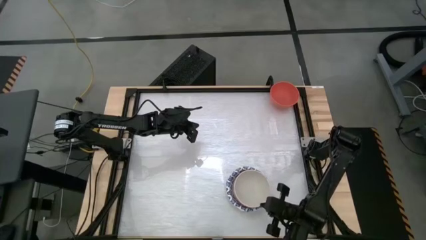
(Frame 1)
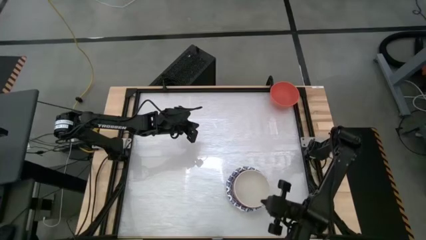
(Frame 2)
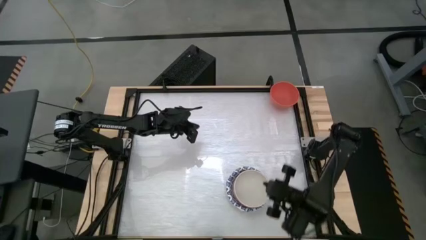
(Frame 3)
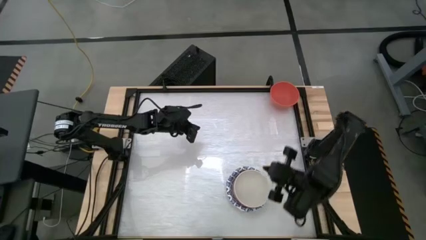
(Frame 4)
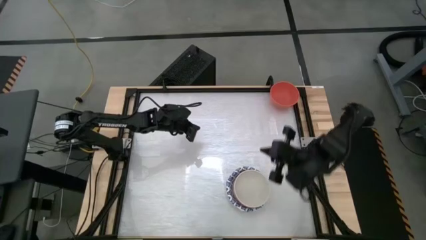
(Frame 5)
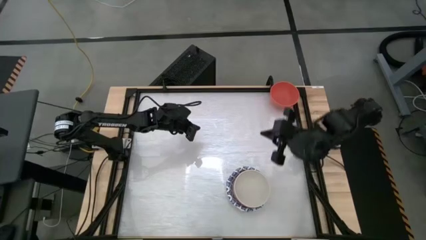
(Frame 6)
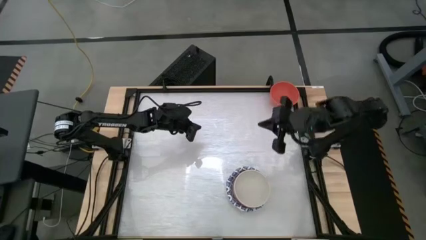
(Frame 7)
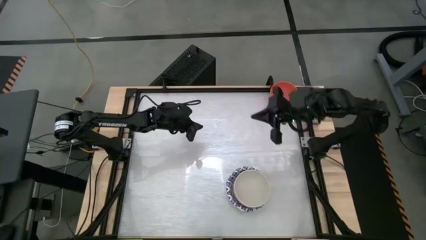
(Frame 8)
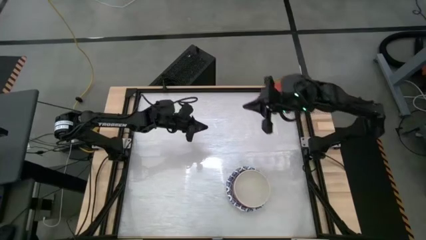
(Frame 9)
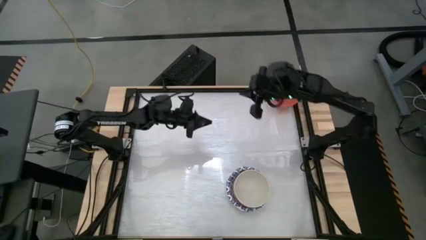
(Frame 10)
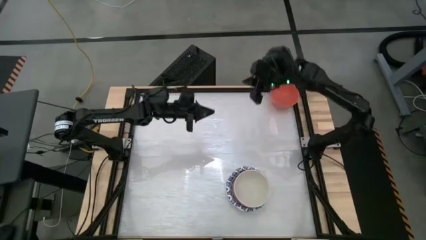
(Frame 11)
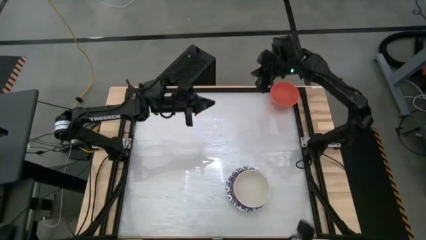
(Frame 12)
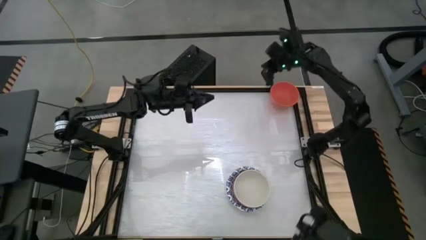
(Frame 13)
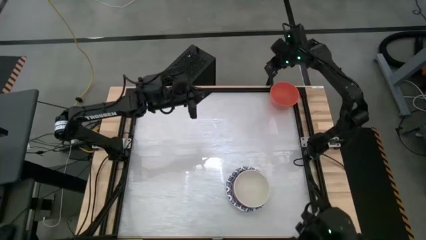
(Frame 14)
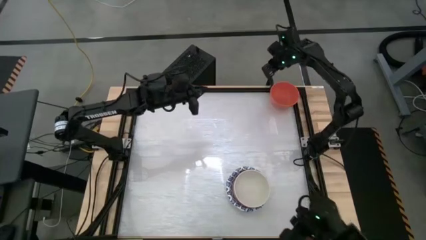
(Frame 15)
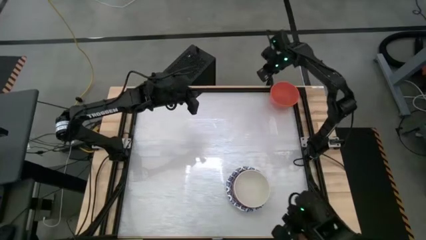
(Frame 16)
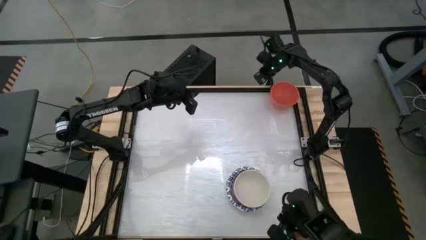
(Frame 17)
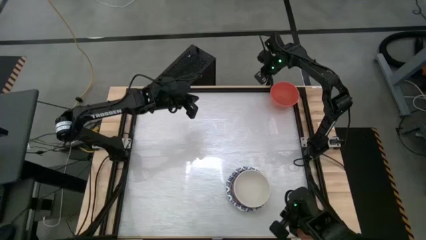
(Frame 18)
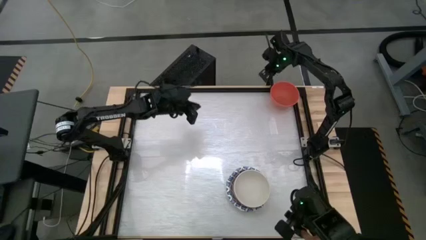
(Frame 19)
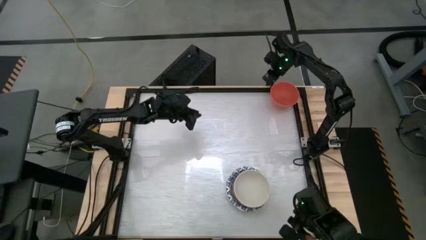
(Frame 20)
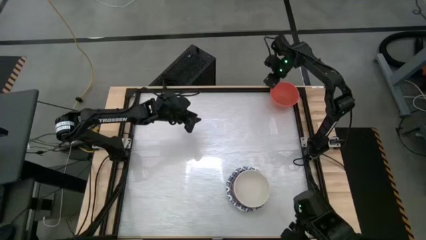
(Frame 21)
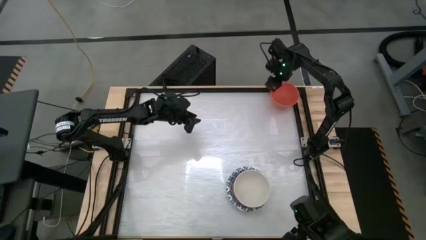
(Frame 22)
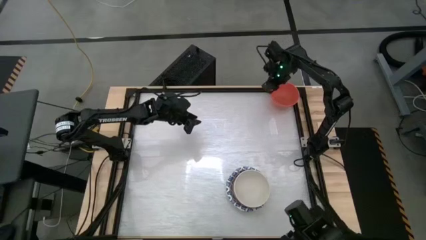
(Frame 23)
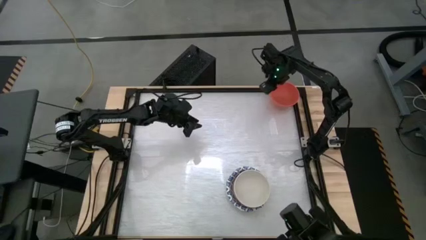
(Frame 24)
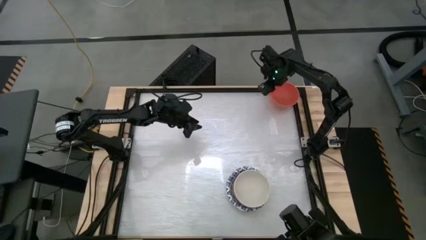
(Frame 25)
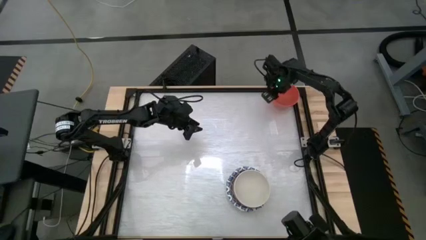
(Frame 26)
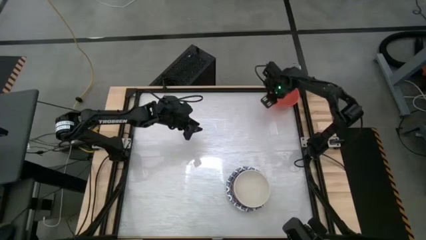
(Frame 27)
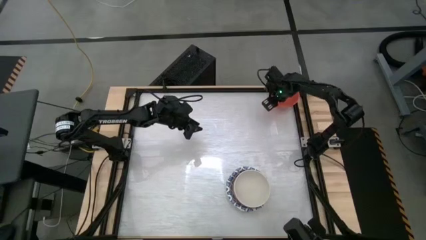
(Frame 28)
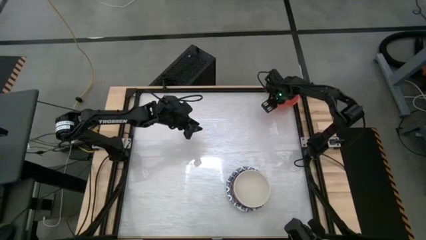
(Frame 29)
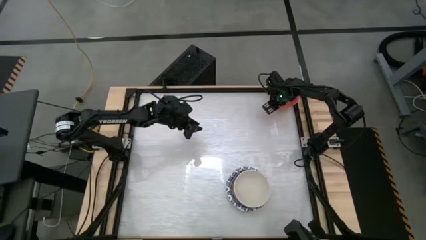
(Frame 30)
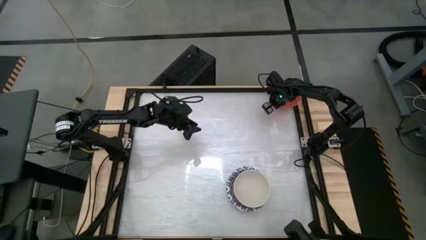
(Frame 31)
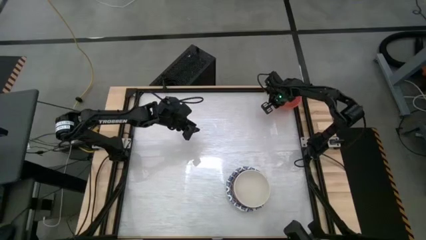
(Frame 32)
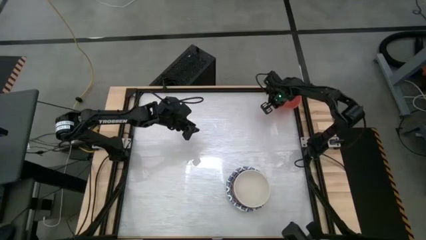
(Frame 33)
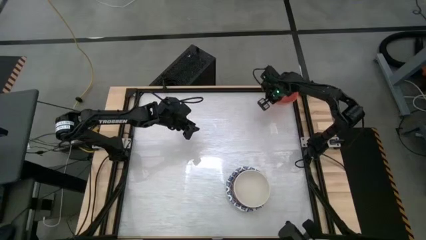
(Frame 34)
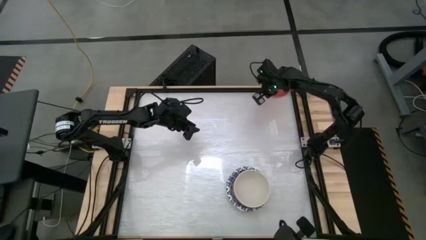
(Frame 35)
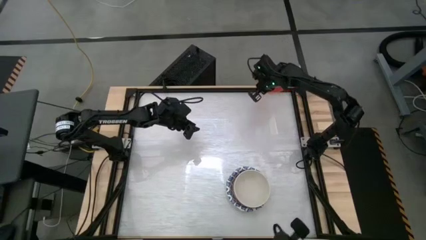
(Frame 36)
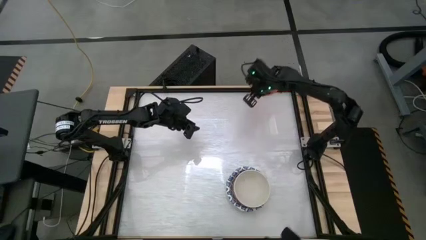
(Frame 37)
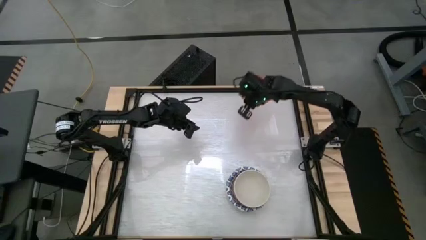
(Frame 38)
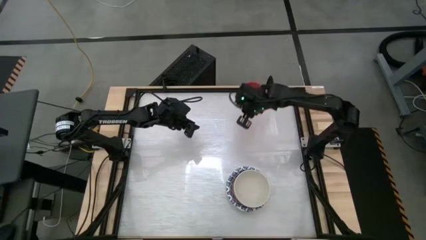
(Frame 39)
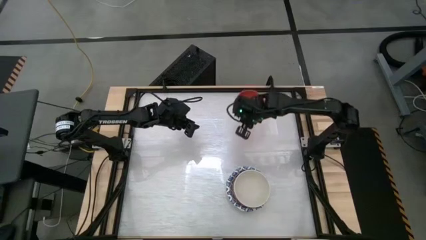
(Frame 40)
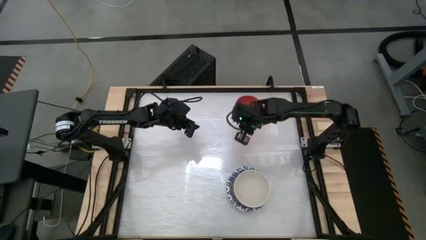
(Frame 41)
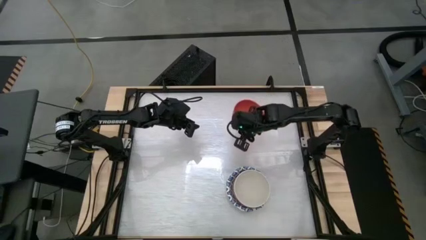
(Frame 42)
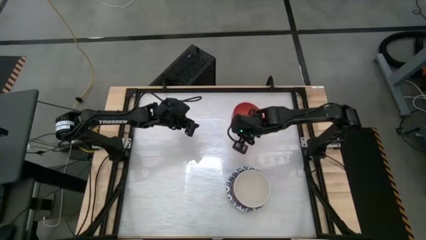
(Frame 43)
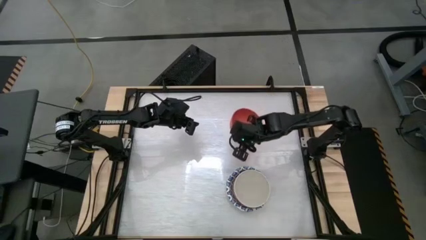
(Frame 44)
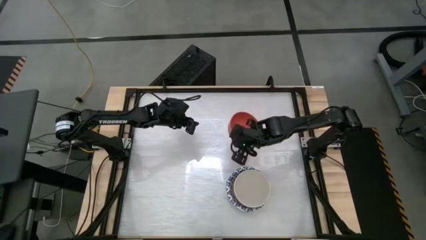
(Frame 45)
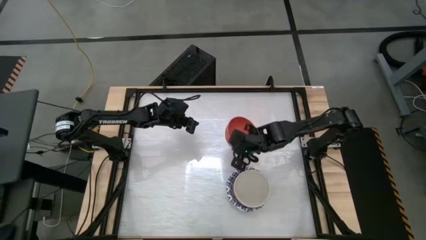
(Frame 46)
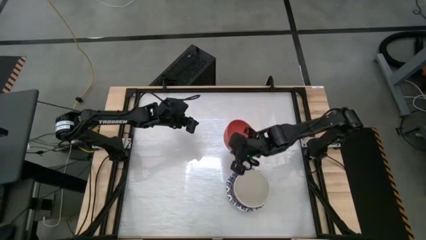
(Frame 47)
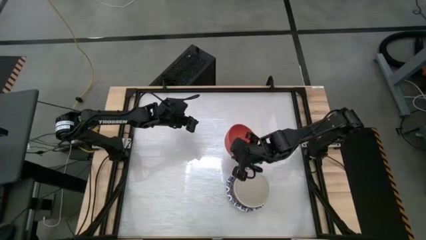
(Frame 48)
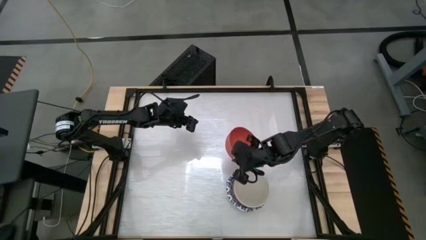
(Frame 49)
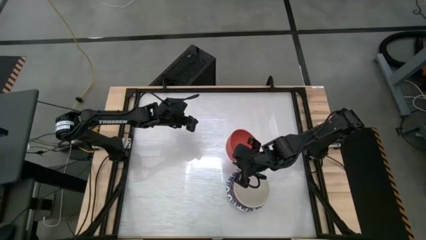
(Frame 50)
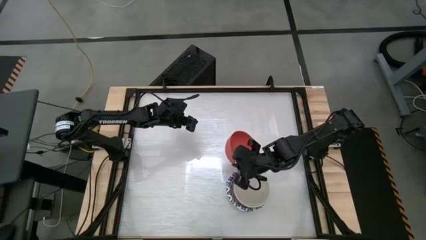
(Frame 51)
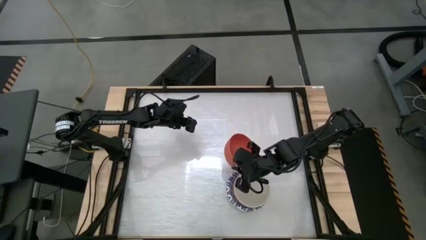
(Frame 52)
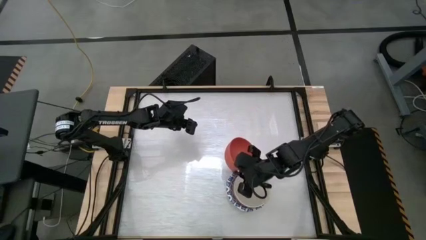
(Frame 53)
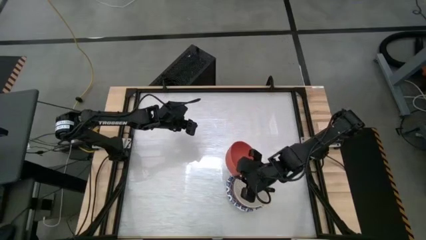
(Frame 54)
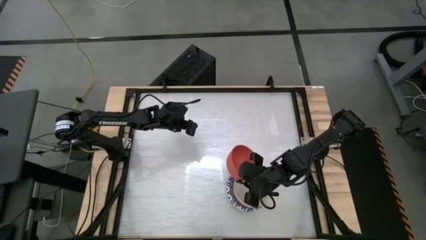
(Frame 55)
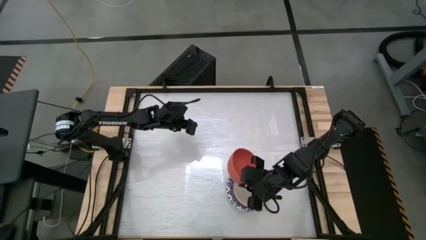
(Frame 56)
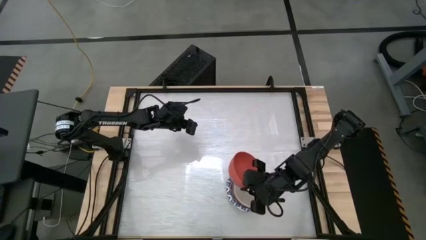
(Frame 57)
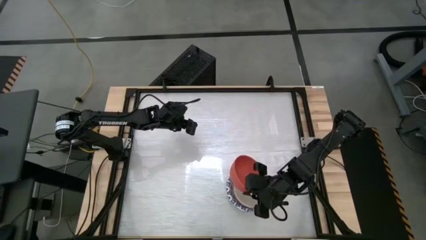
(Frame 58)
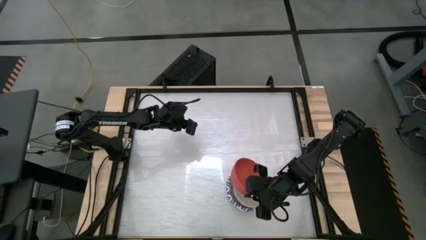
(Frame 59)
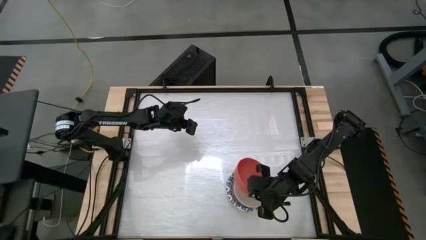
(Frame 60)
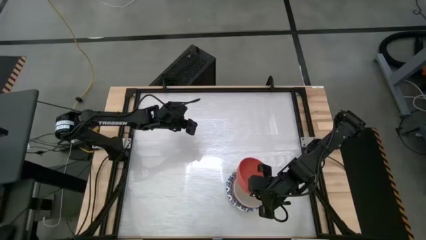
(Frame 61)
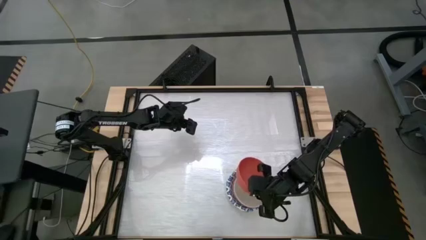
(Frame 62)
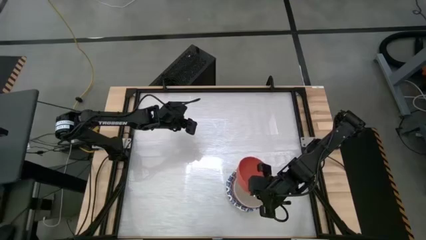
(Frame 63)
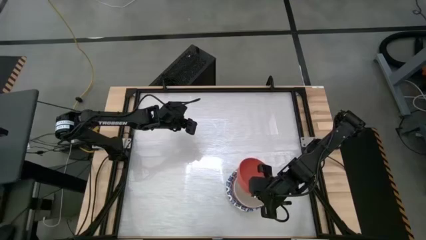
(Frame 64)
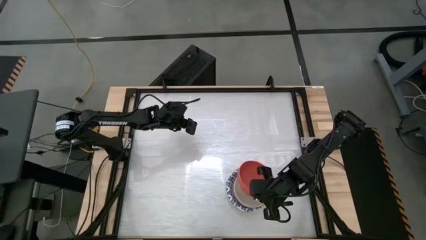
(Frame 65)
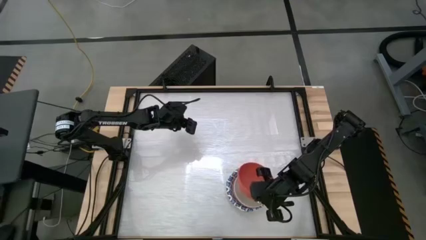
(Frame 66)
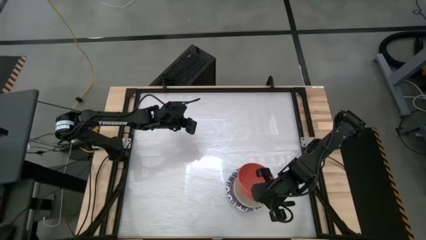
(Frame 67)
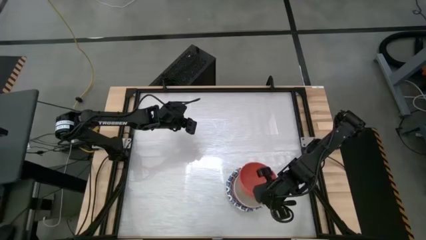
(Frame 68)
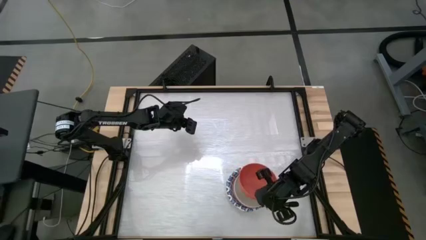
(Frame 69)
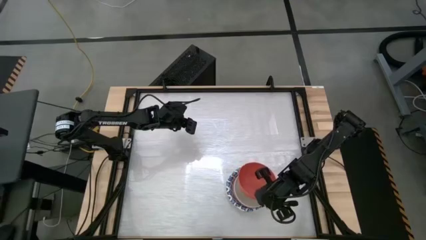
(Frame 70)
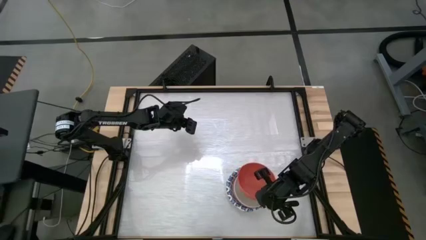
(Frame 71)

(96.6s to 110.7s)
Stack the orange bowl on top of the white bowl
